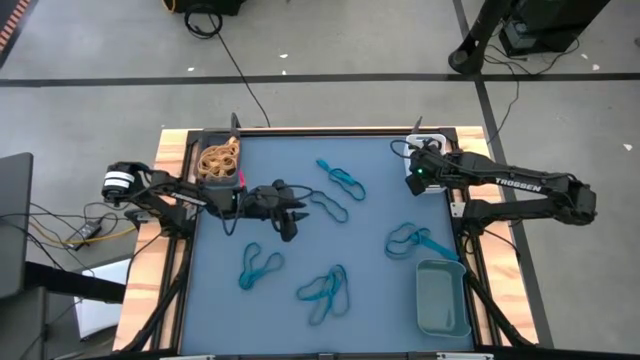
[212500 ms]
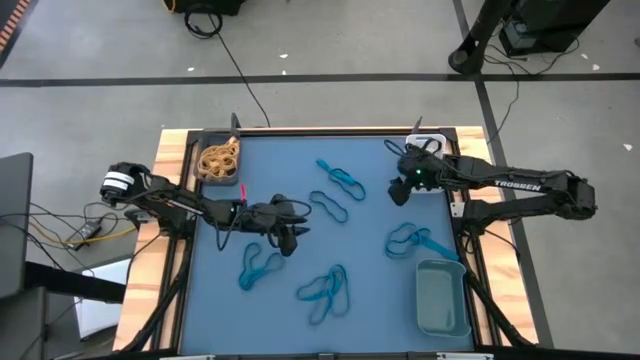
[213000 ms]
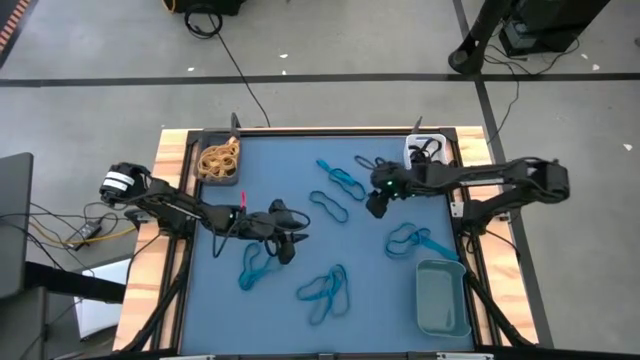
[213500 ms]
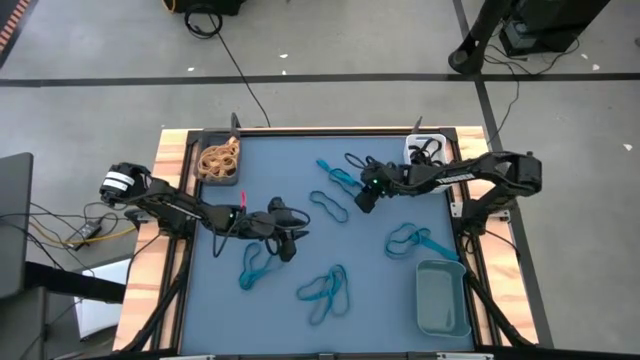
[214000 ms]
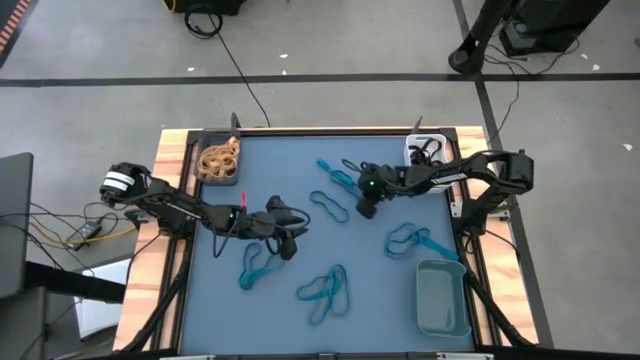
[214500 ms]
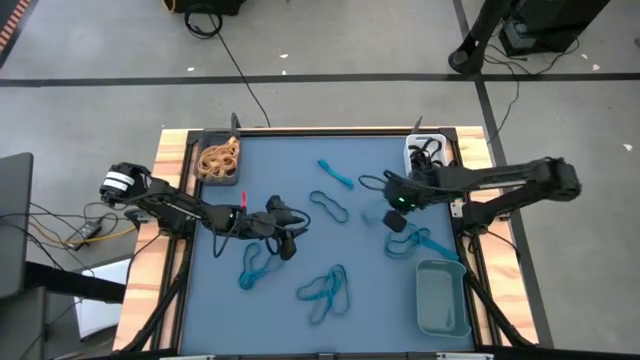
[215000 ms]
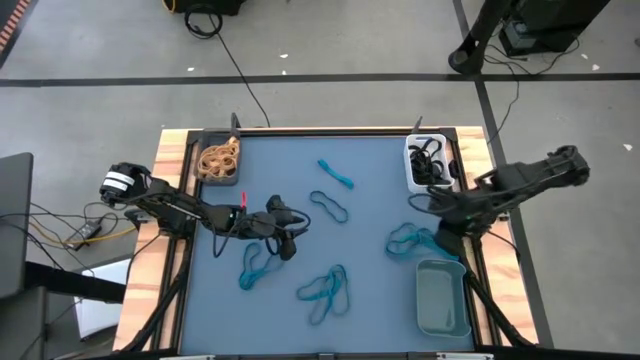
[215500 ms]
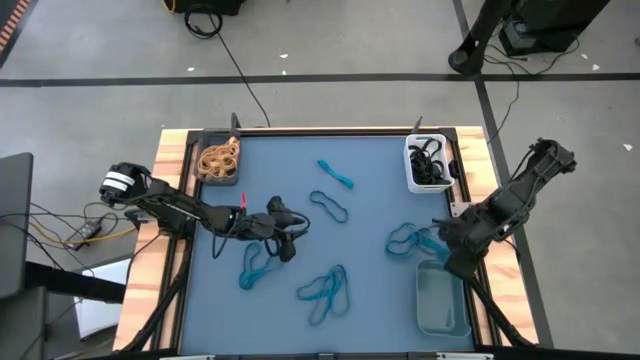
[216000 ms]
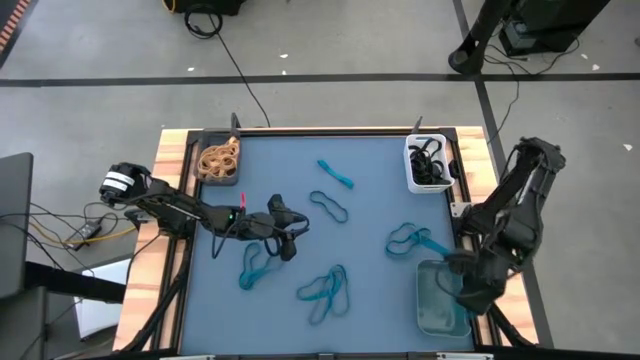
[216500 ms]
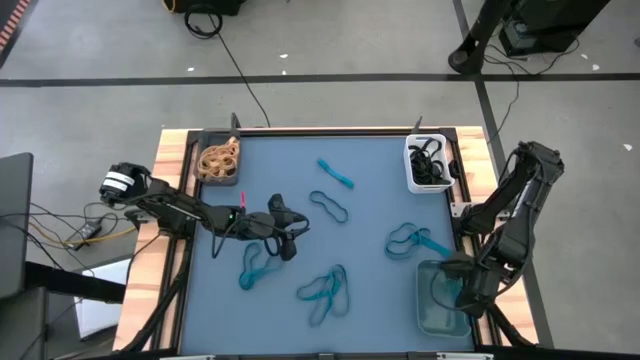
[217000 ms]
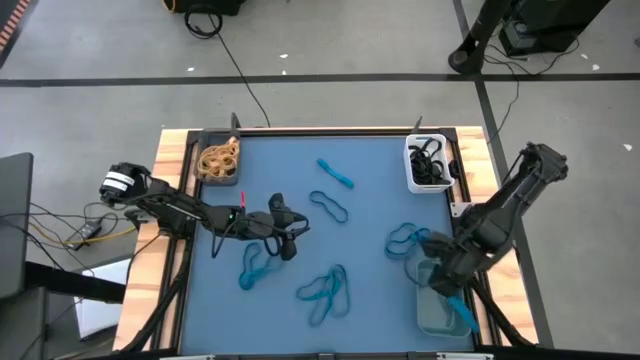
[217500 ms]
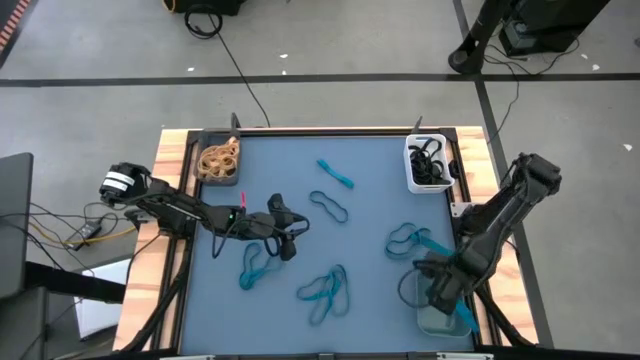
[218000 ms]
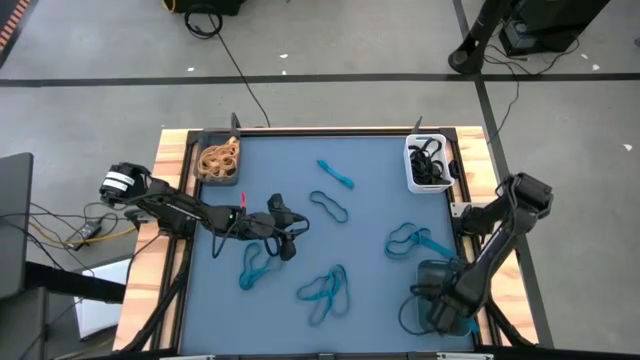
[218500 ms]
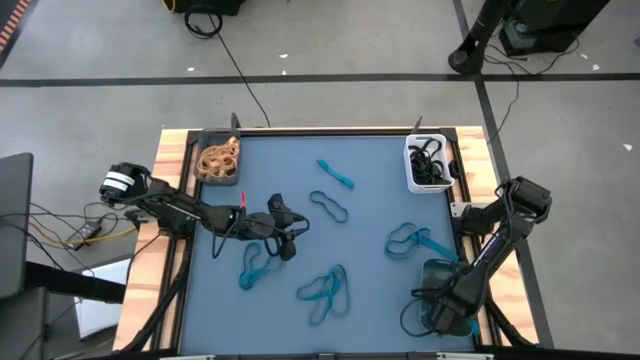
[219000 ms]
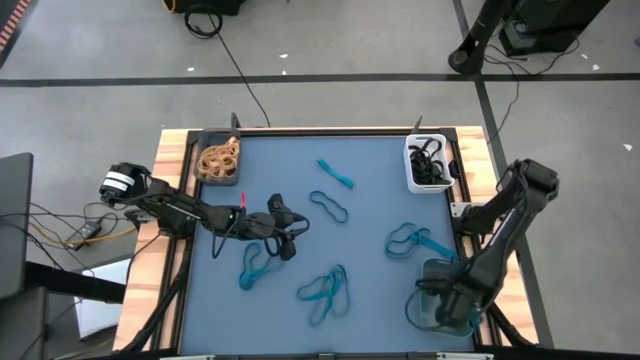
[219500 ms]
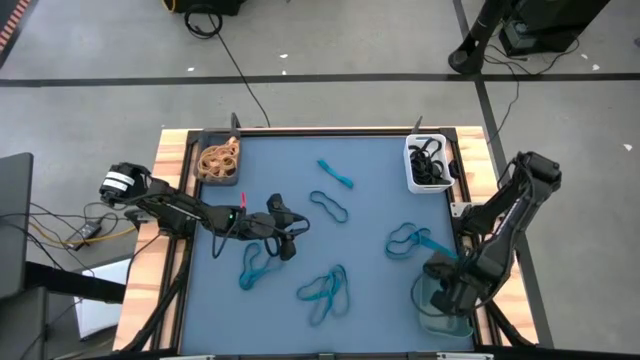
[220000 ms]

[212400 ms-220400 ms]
Task: Sort rubber bands into baskets
Put the blue rubber band into the blue bin

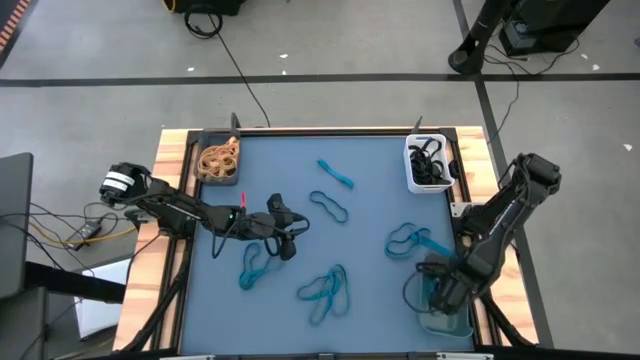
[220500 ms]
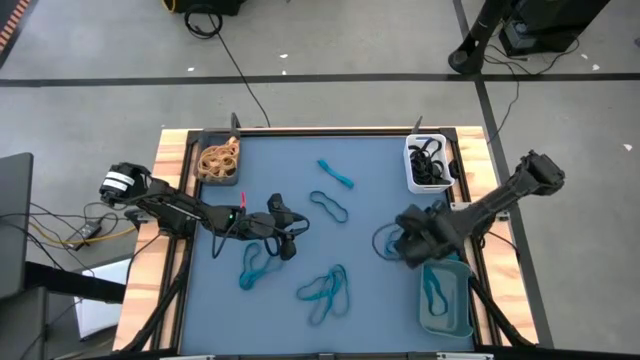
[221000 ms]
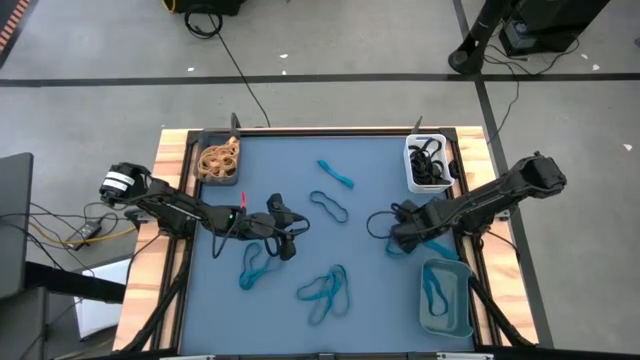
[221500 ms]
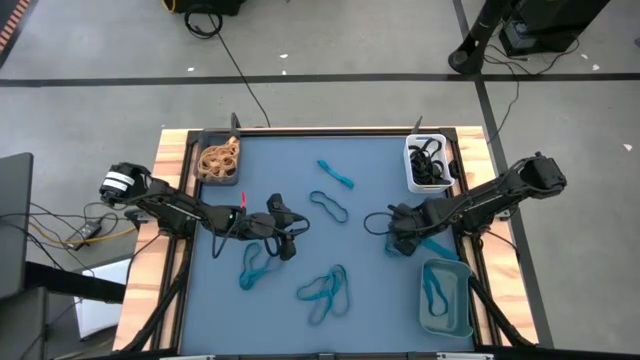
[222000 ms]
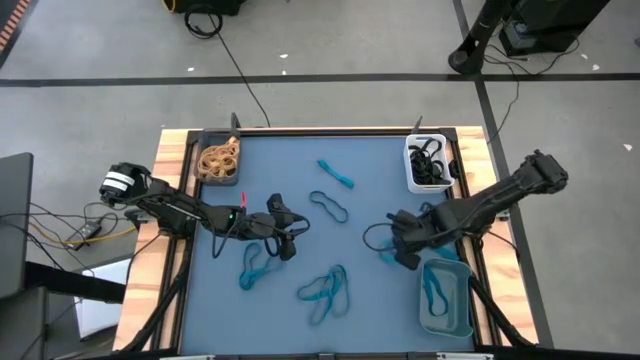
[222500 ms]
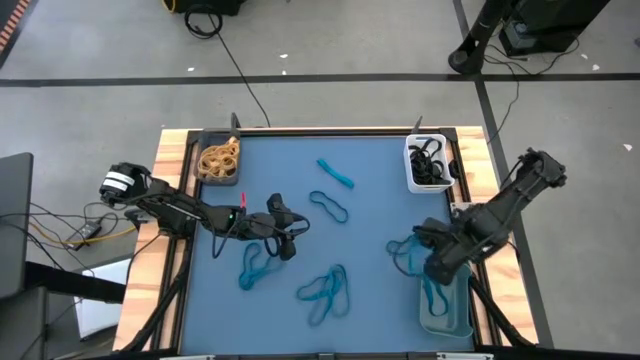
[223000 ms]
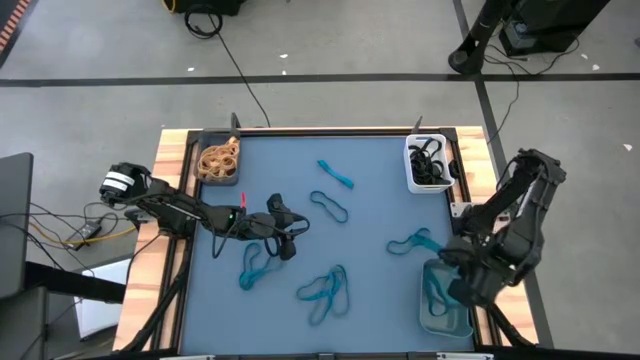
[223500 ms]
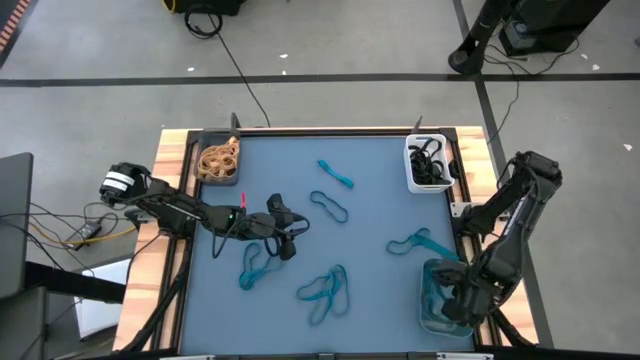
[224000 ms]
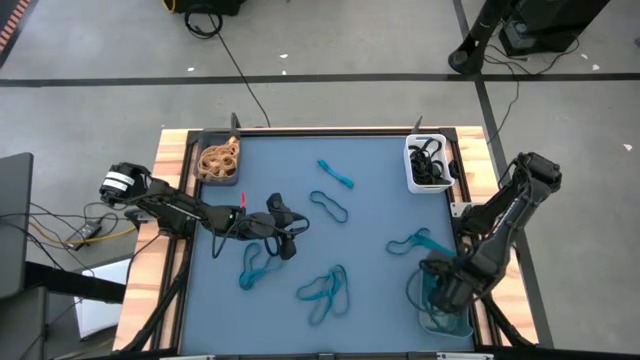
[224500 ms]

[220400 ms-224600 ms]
Put the blue rubber band into the blue bin

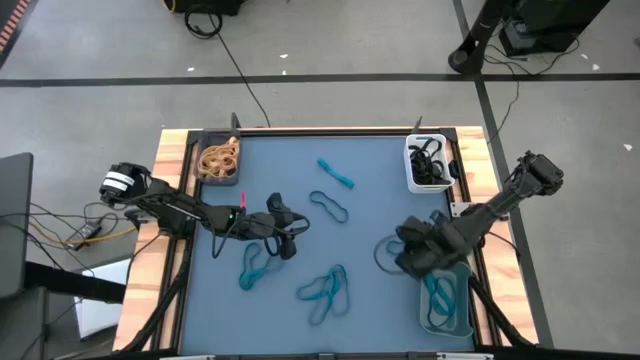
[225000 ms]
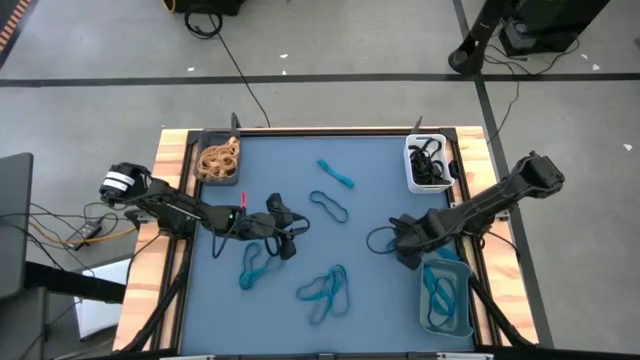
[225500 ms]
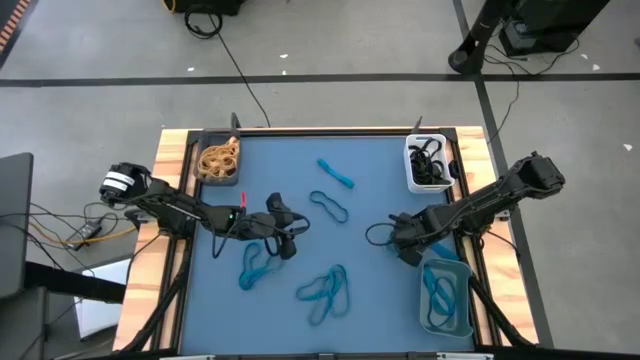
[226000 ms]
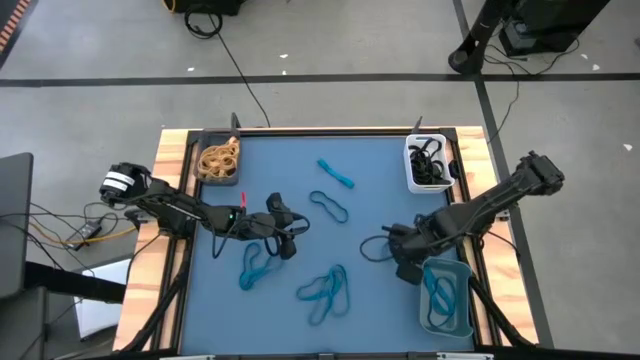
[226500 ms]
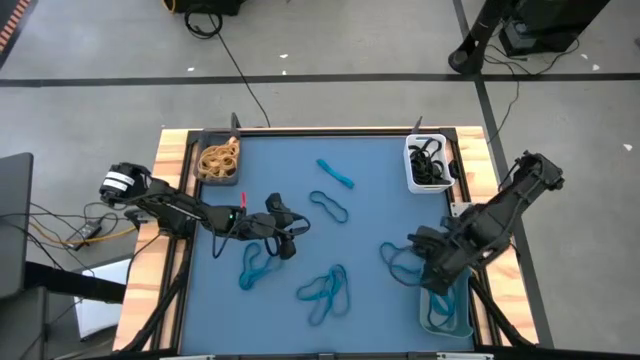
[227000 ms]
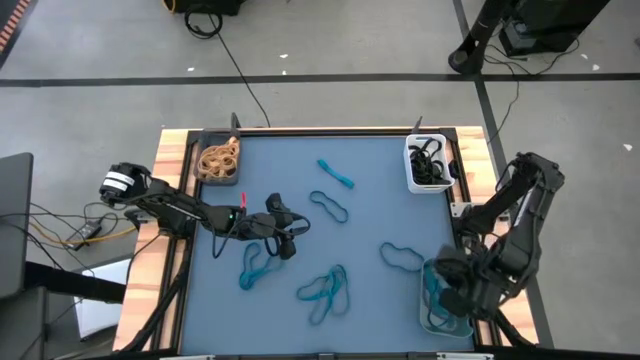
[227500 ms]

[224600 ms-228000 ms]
Put the blue rubber band into the blue bin

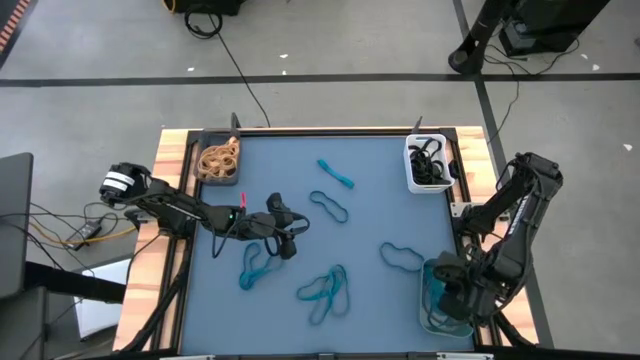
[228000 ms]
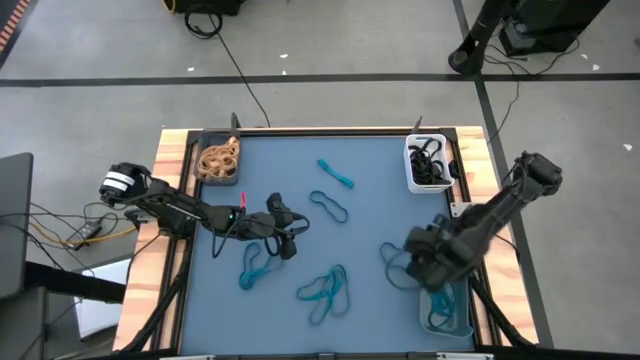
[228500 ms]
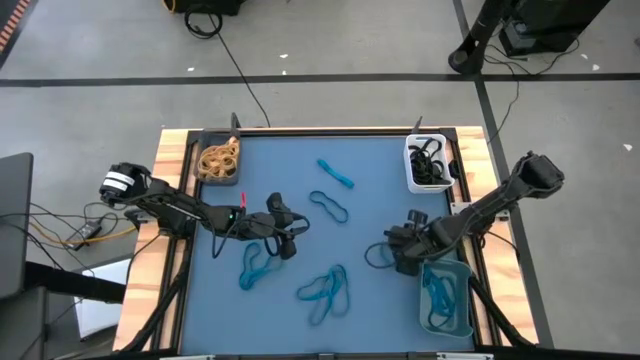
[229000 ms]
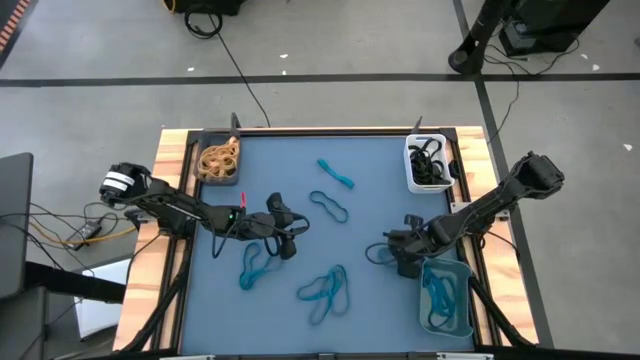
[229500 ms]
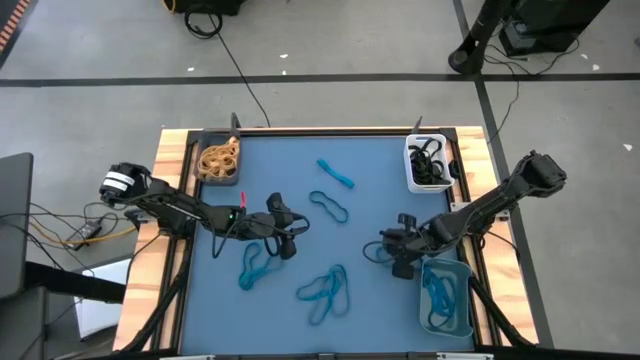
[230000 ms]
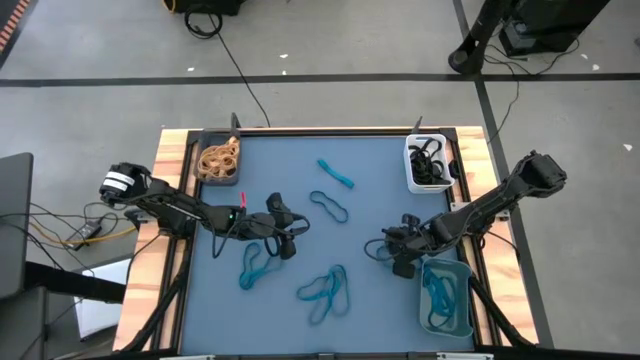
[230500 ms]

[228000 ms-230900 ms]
Put the blue rubber band into the blue bin

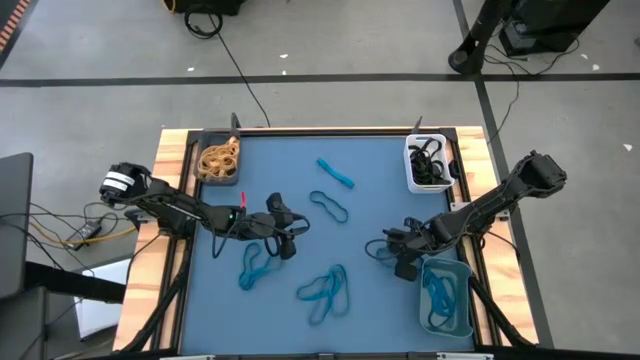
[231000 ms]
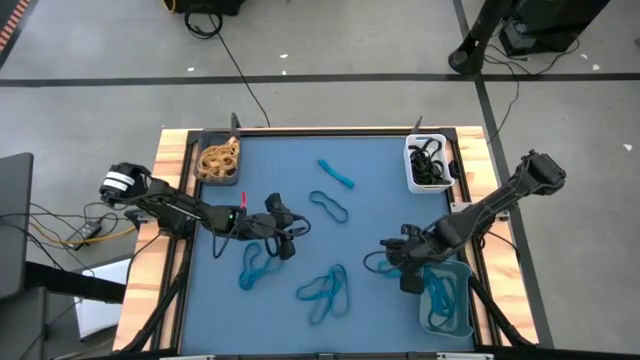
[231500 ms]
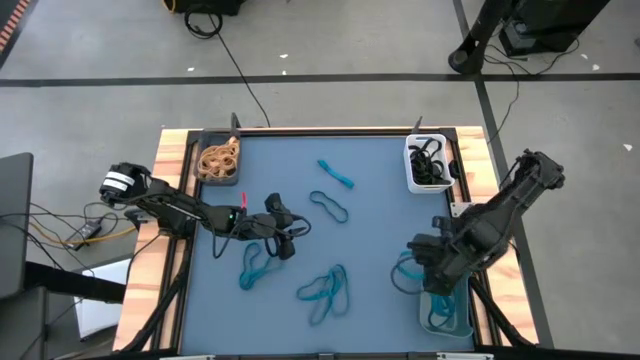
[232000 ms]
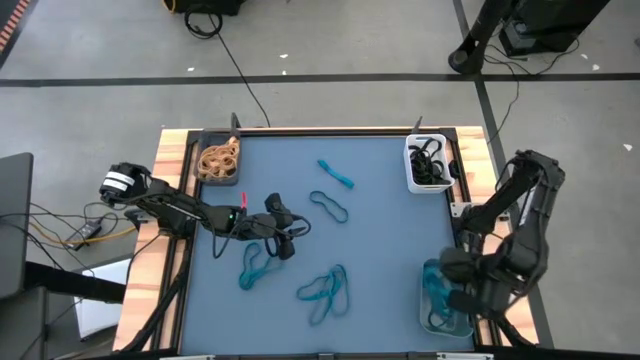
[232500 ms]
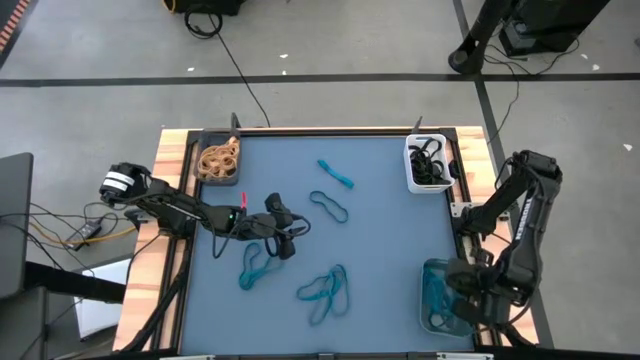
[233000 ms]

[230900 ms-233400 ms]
Put the blue rubber band into the blue bin
